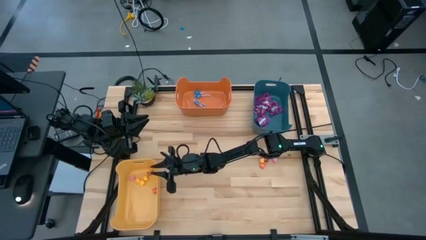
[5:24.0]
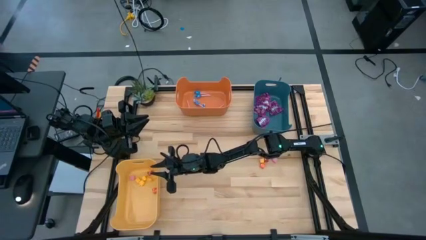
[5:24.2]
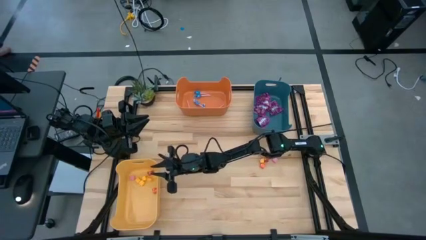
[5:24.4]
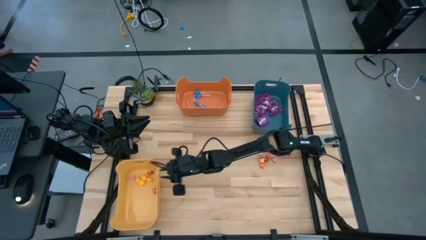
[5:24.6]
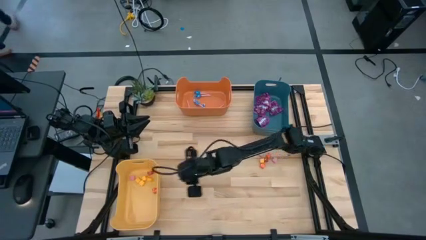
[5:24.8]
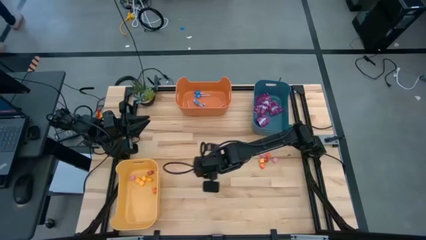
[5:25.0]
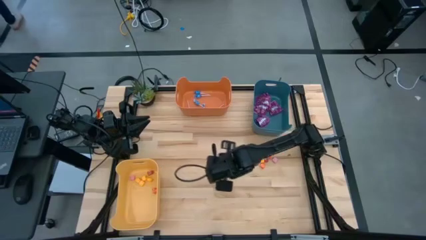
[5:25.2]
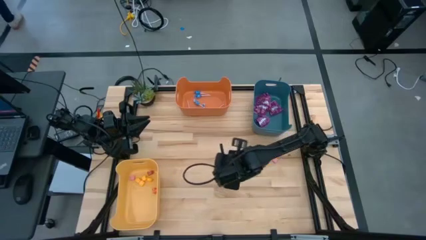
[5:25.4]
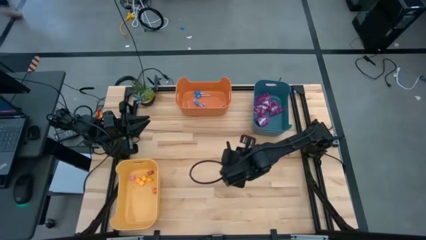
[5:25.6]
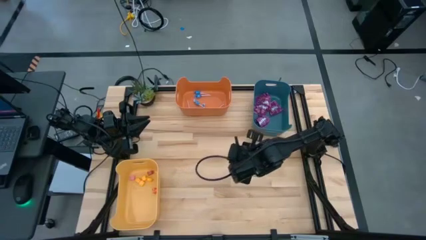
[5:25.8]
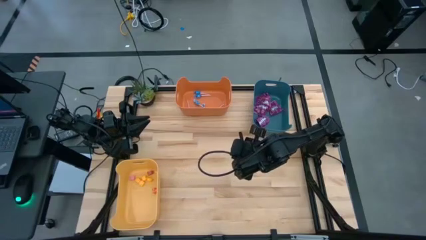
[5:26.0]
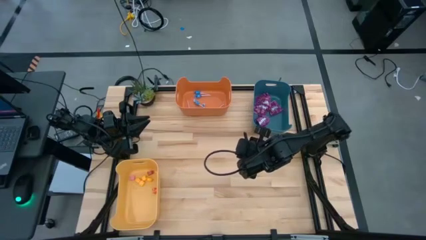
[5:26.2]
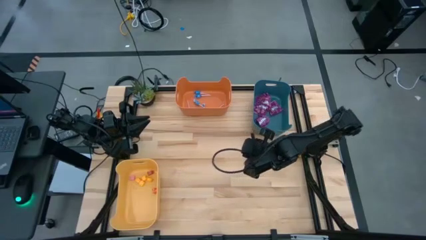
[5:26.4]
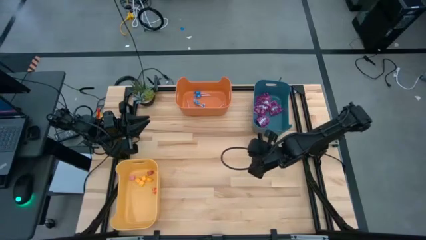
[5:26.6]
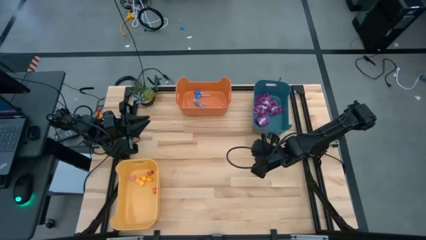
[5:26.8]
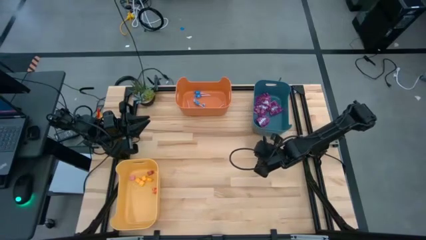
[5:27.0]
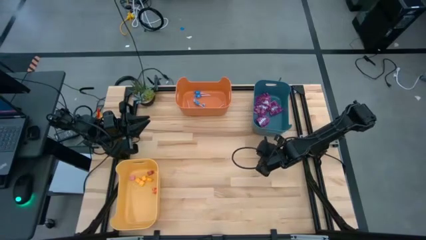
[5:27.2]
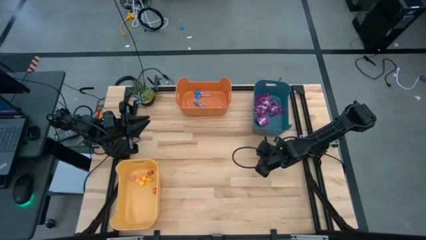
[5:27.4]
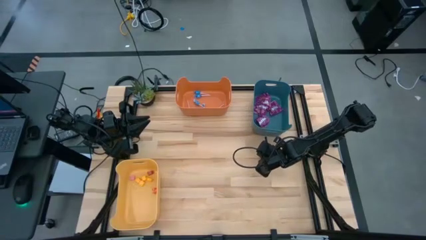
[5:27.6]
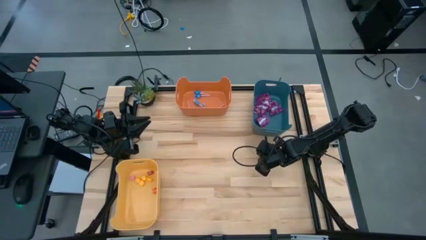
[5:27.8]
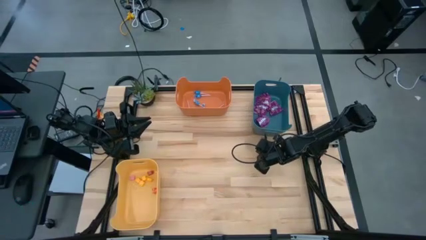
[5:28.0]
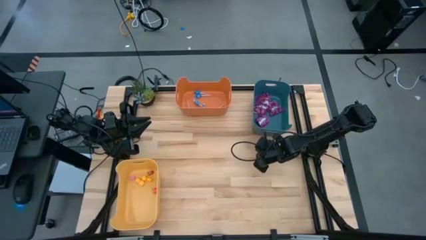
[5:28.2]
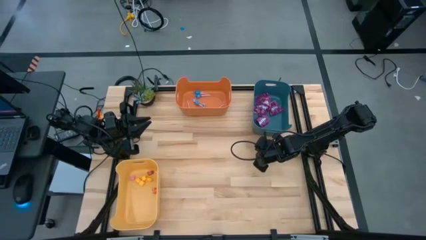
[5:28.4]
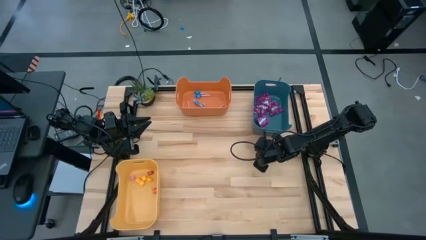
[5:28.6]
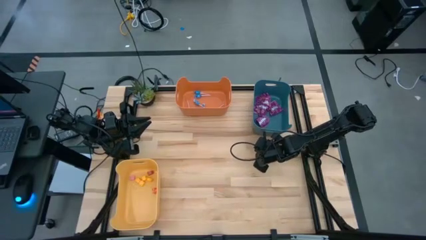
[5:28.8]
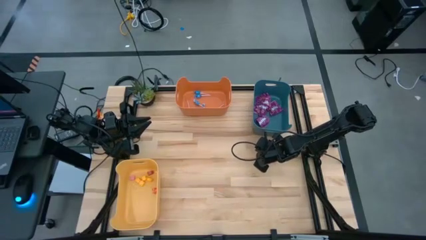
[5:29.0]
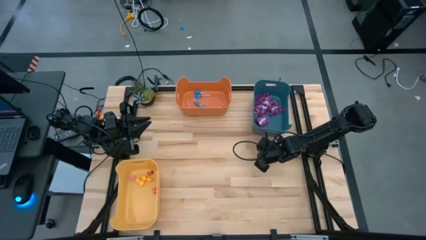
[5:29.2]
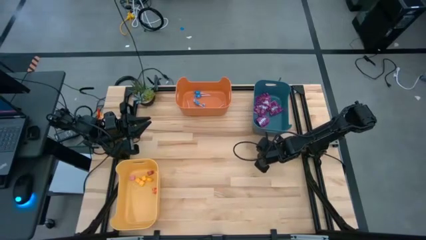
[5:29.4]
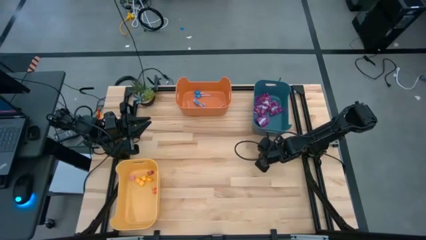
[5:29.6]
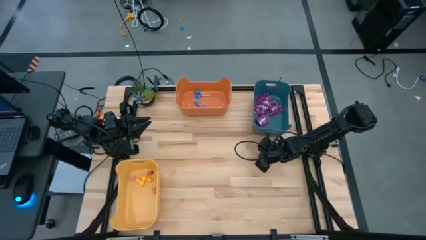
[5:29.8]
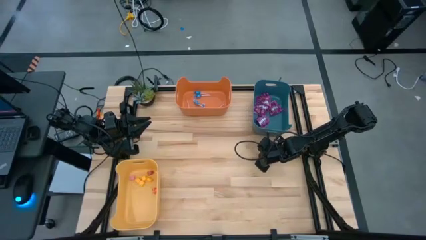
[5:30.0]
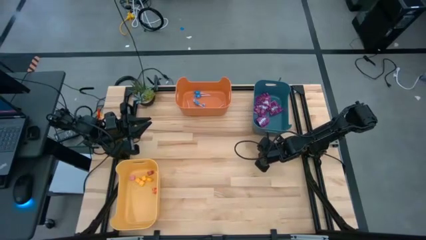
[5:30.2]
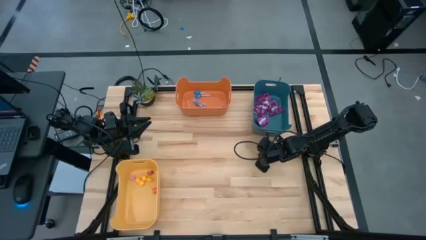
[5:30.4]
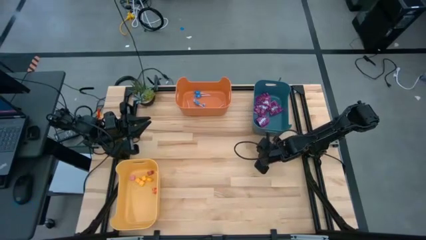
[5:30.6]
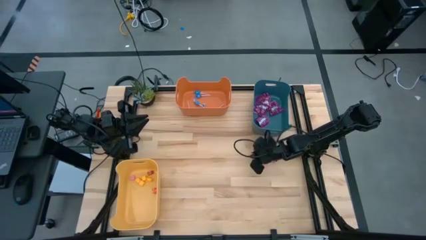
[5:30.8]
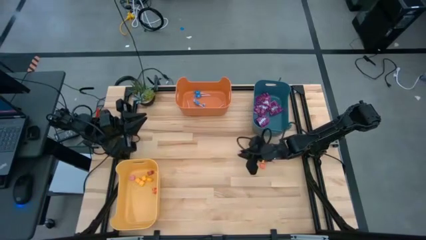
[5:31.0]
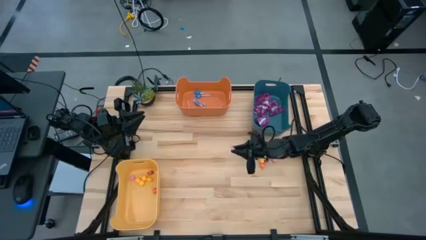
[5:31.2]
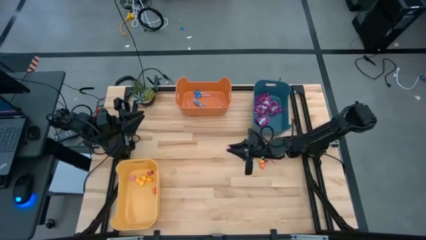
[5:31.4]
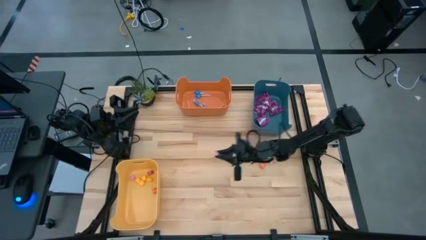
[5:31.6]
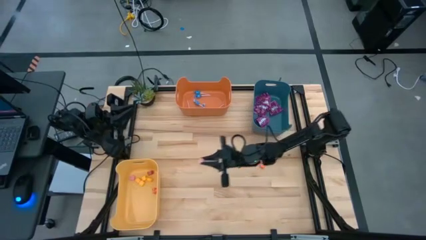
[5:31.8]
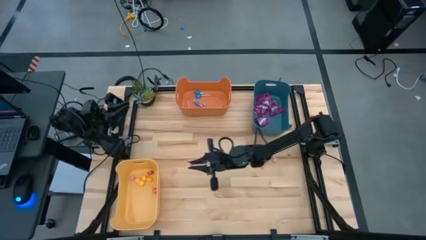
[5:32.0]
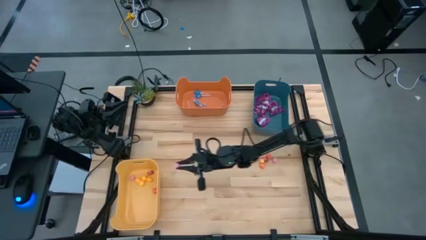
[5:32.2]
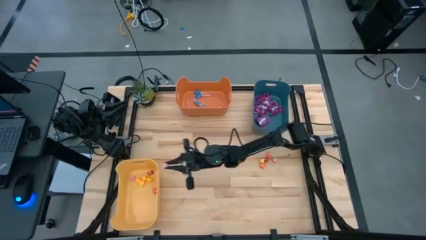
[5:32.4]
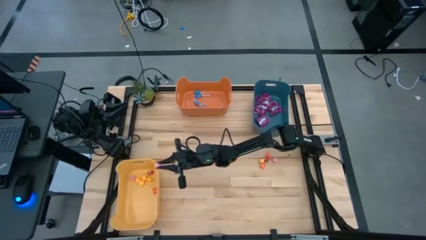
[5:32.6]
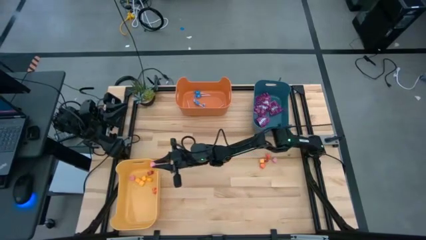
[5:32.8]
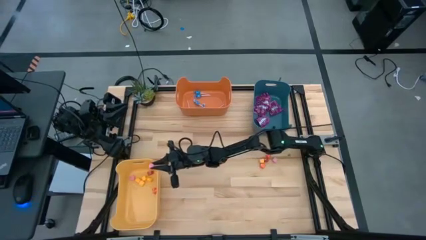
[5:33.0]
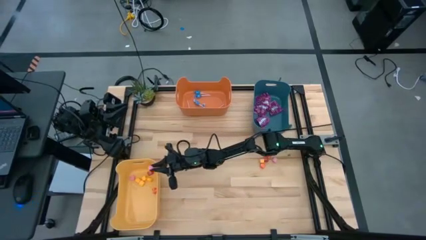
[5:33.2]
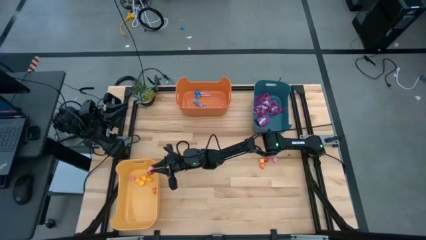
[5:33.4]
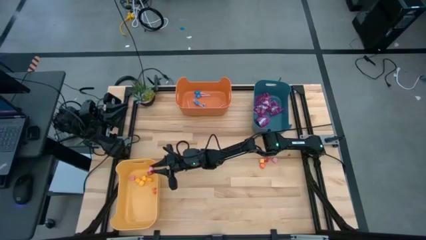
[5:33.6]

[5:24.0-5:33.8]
Task: Sort candy
Put the left pink candy into the yellow bin

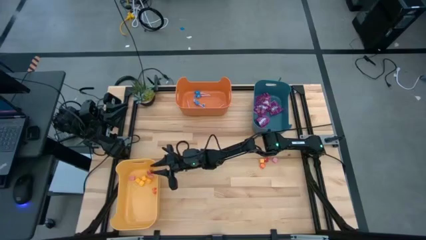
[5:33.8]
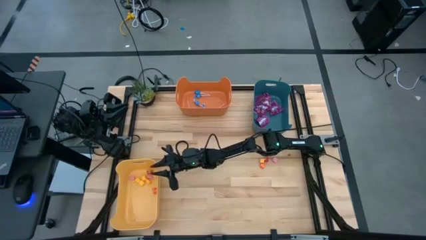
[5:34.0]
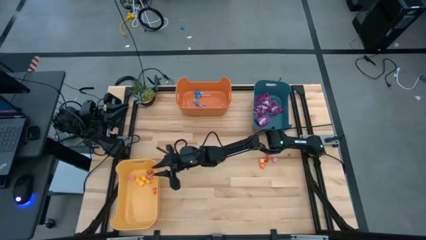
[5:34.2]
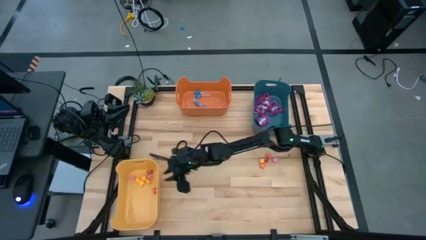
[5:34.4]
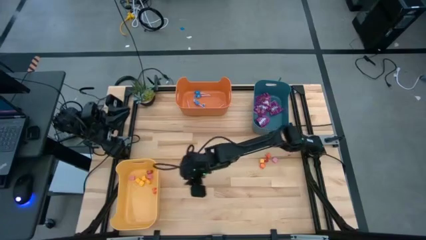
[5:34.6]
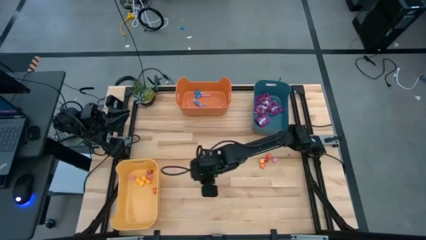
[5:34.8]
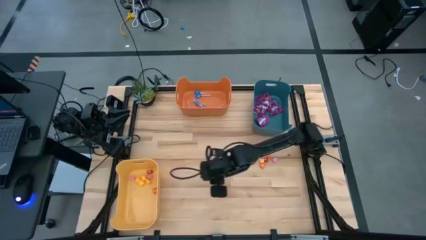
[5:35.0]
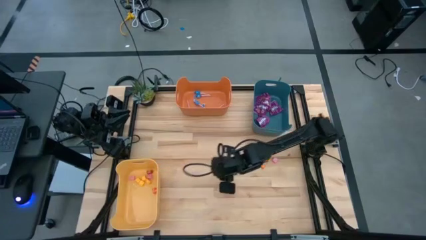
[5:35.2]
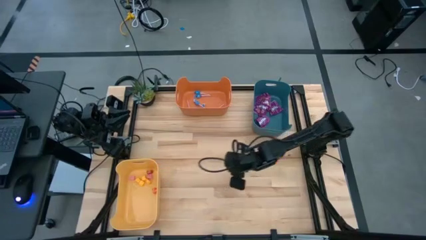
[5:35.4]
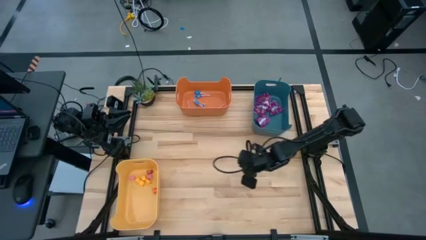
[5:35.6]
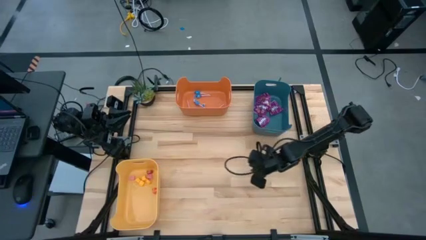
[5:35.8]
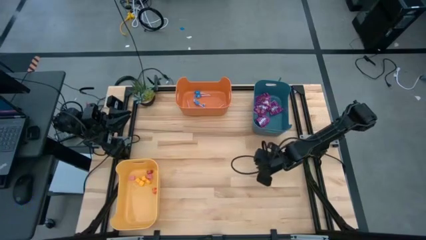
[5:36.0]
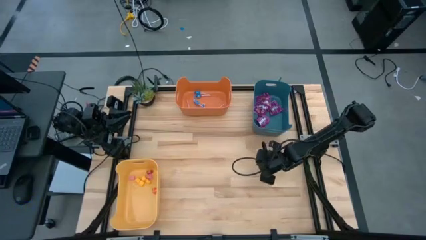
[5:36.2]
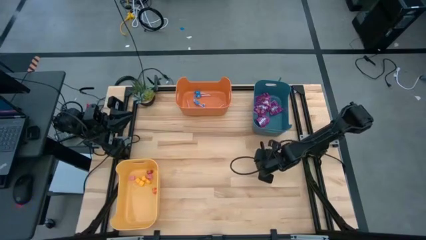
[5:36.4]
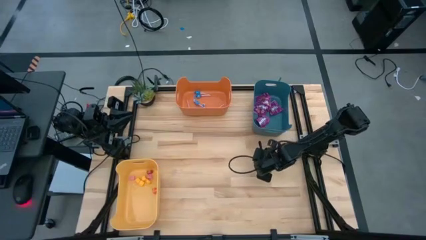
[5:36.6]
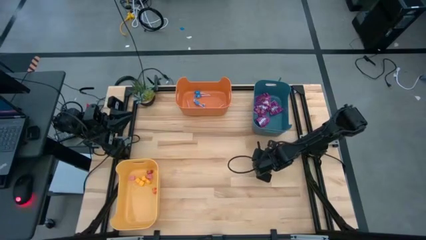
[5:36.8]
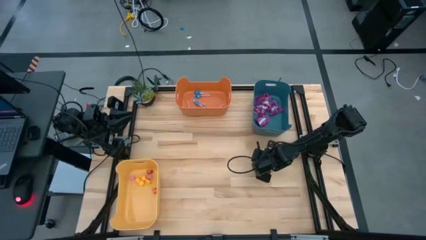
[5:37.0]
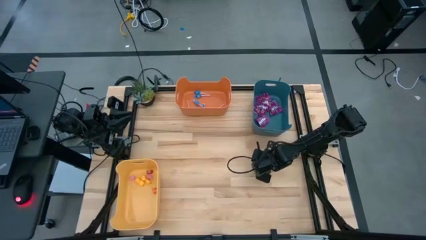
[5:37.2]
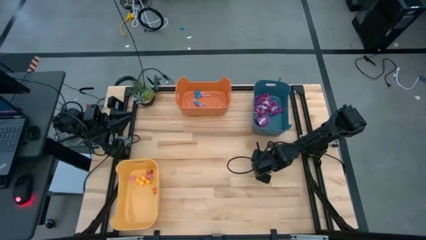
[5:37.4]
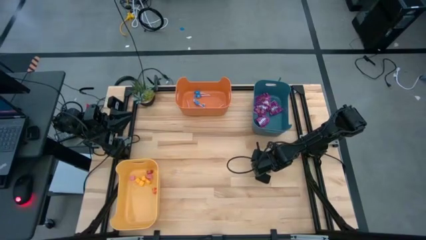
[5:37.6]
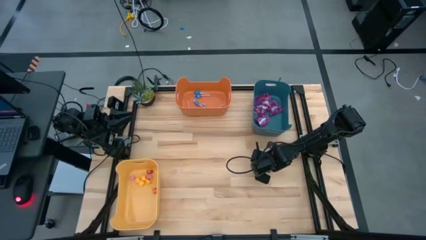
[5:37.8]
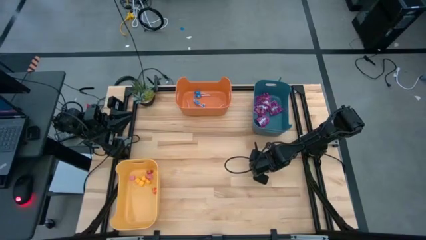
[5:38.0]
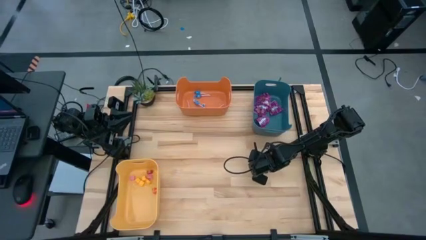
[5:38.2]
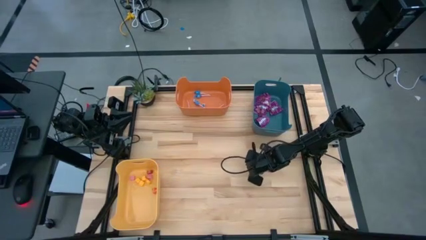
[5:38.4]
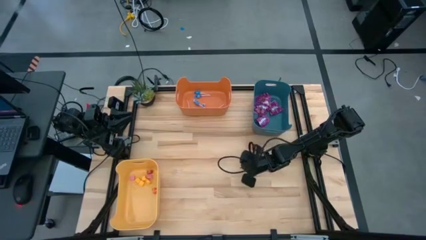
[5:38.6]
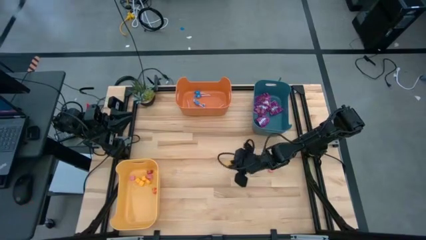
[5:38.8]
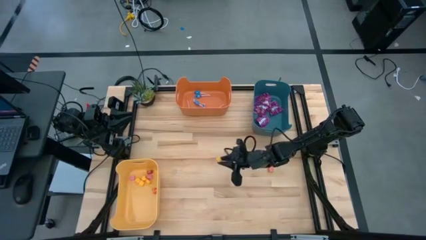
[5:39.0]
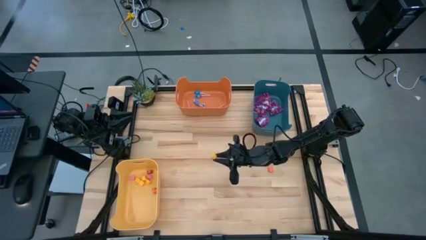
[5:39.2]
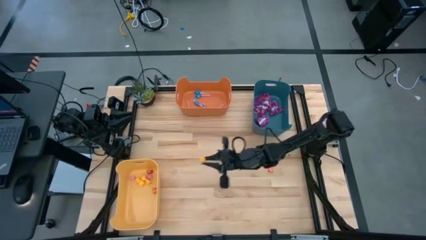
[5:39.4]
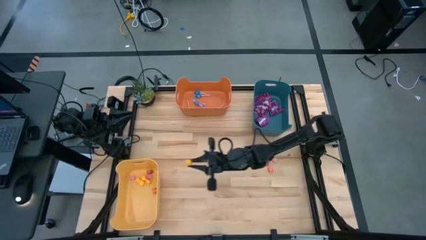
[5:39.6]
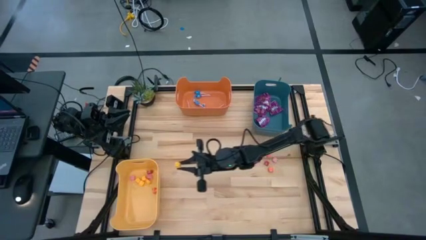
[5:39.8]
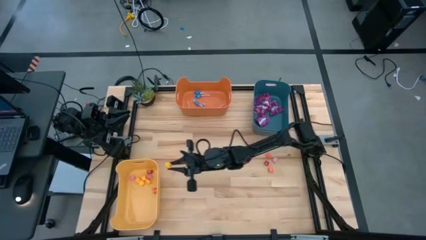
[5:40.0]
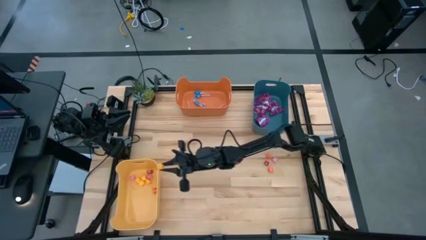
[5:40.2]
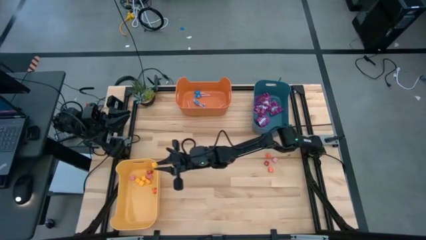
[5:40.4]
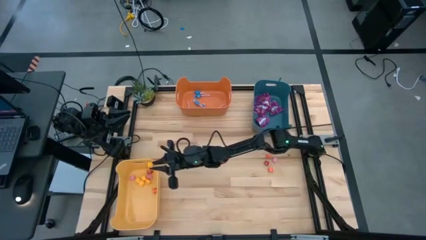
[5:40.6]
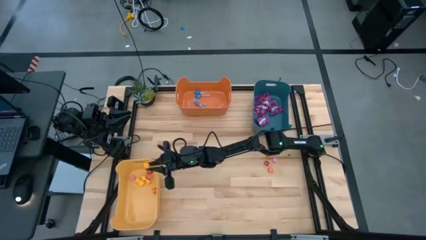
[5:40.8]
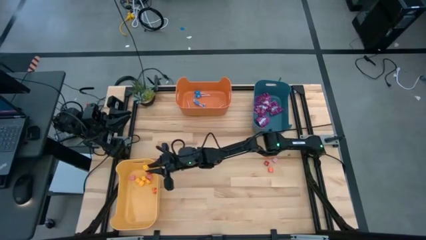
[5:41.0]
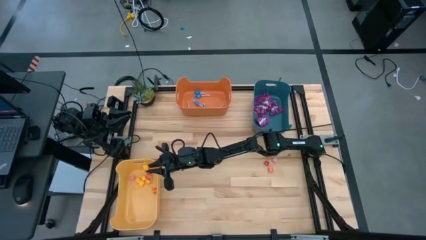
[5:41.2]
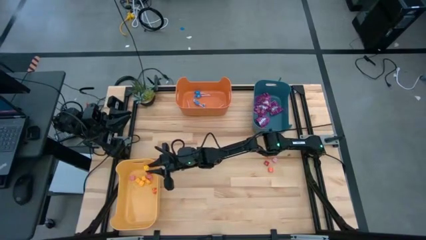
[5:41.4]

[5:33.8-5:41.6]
Put the yellow candy into the yellow bin
